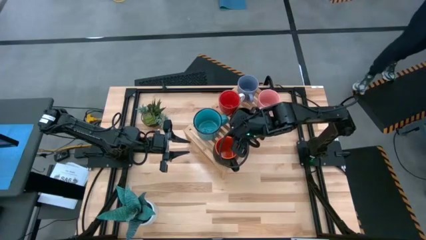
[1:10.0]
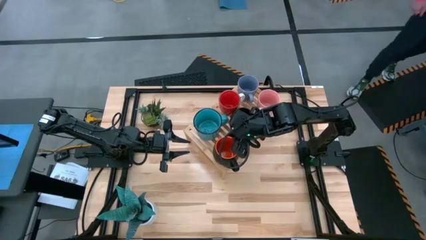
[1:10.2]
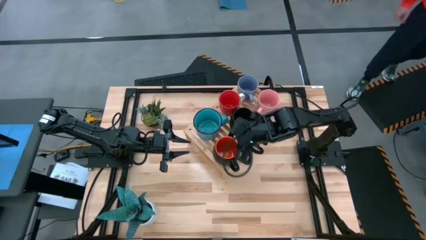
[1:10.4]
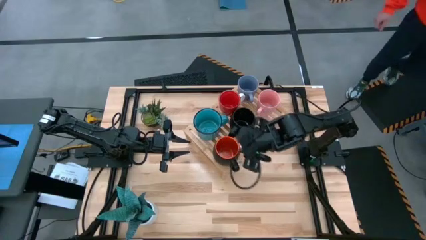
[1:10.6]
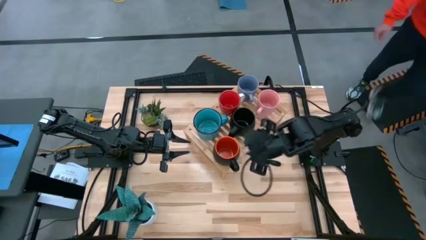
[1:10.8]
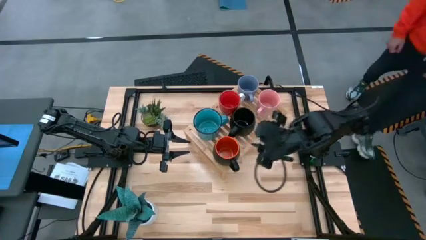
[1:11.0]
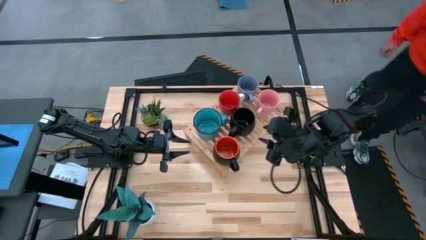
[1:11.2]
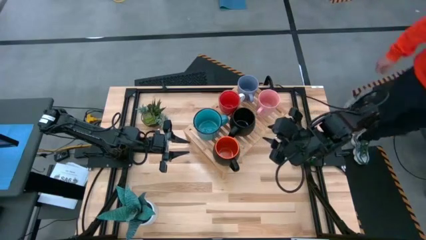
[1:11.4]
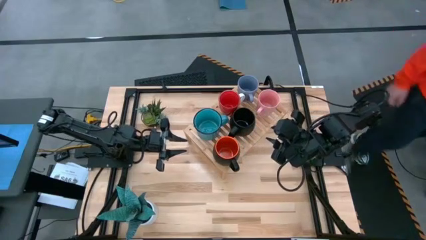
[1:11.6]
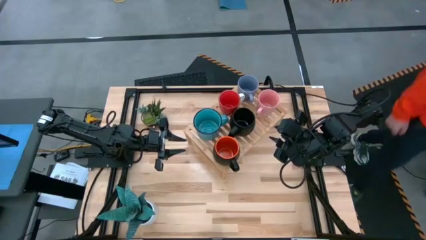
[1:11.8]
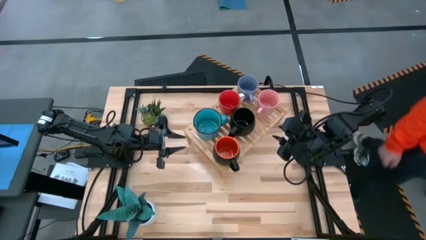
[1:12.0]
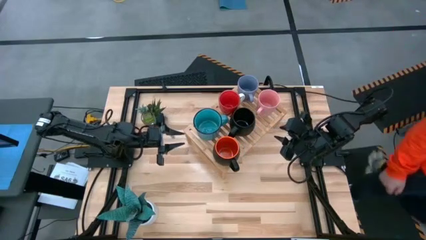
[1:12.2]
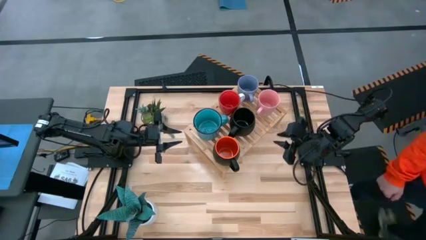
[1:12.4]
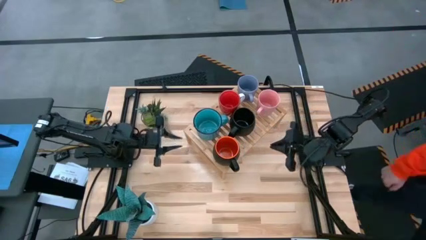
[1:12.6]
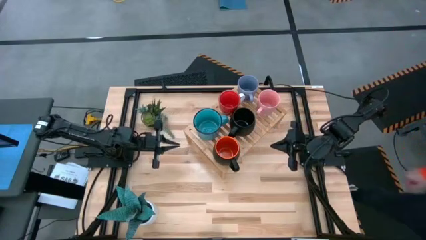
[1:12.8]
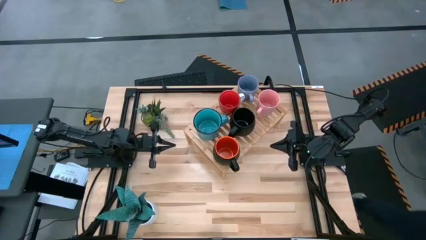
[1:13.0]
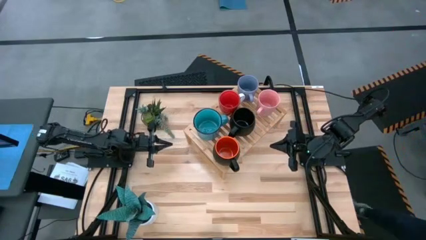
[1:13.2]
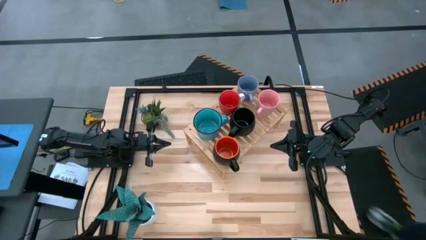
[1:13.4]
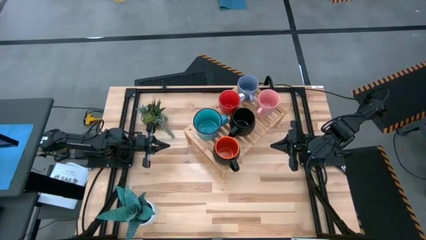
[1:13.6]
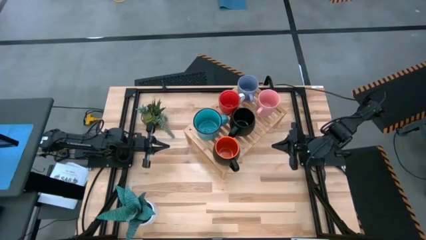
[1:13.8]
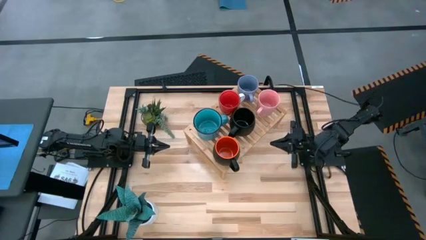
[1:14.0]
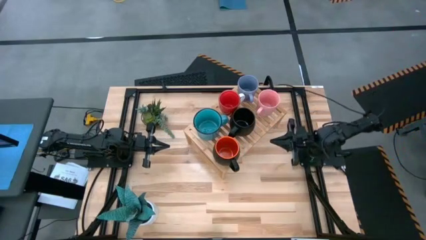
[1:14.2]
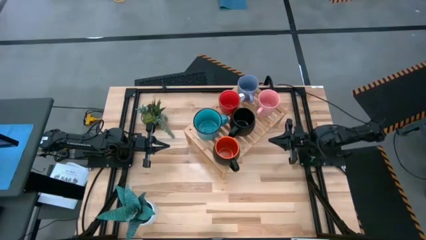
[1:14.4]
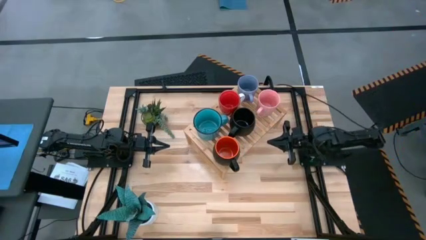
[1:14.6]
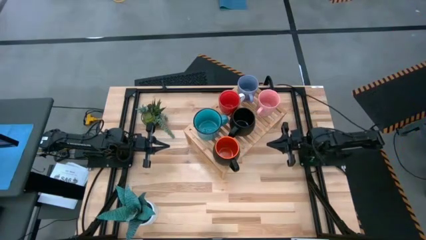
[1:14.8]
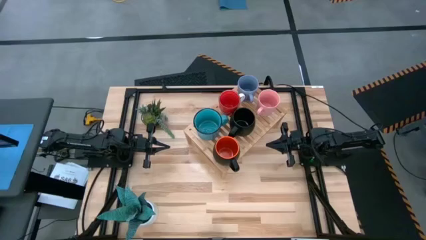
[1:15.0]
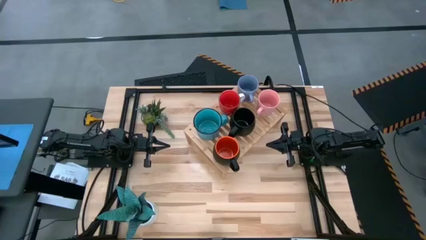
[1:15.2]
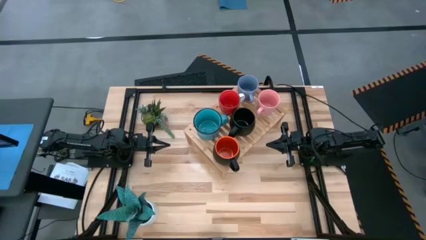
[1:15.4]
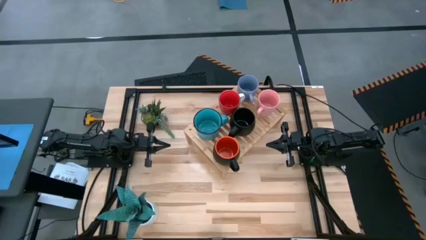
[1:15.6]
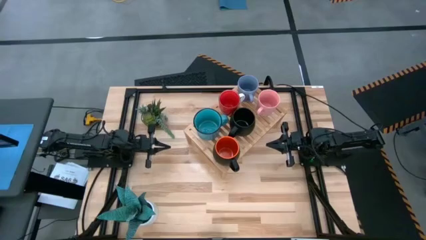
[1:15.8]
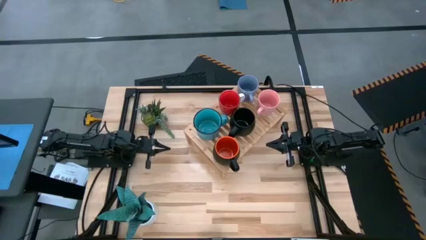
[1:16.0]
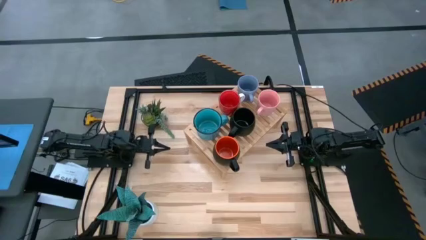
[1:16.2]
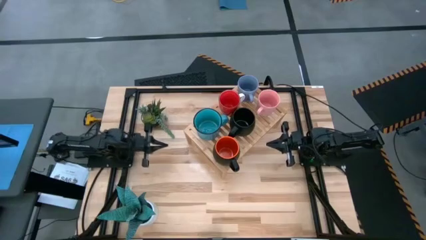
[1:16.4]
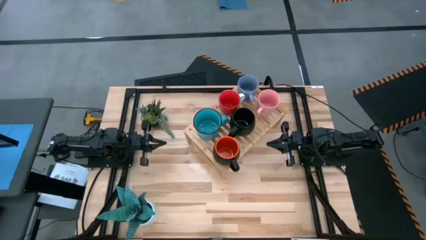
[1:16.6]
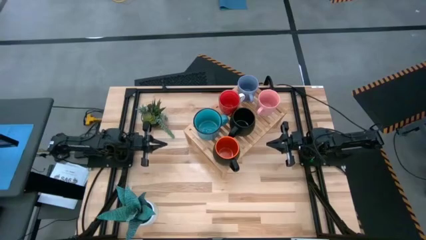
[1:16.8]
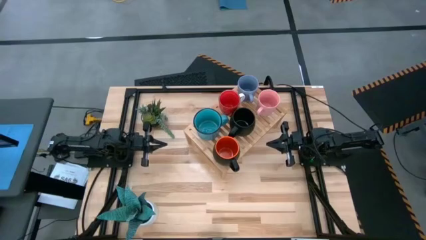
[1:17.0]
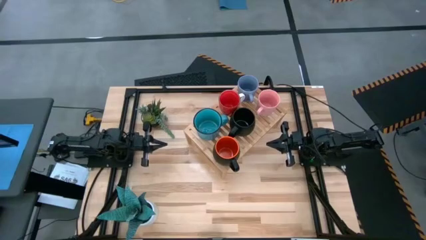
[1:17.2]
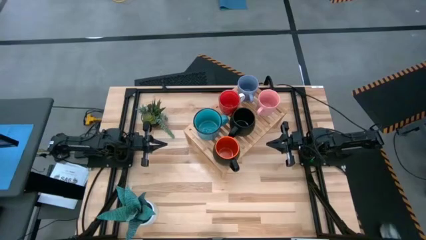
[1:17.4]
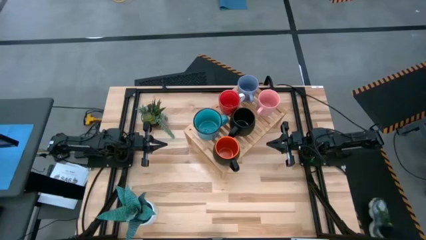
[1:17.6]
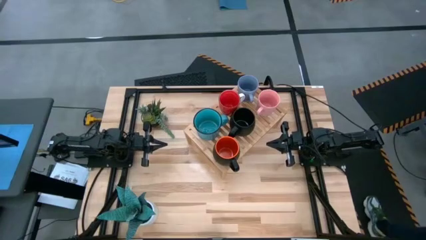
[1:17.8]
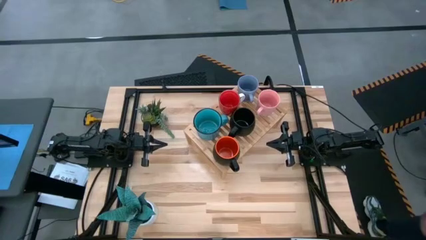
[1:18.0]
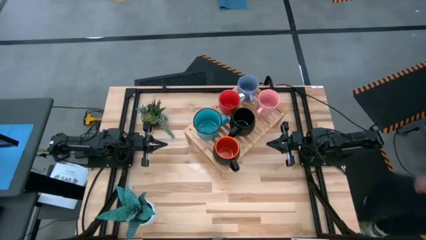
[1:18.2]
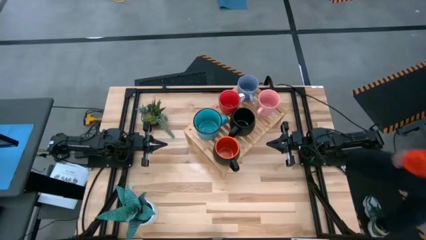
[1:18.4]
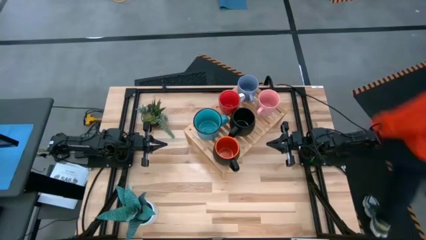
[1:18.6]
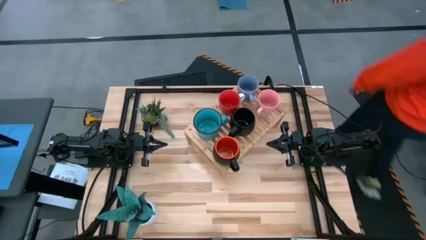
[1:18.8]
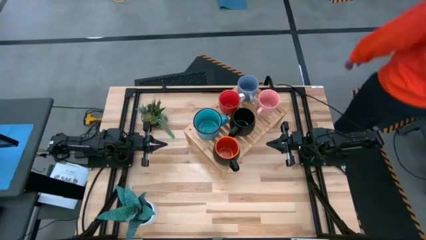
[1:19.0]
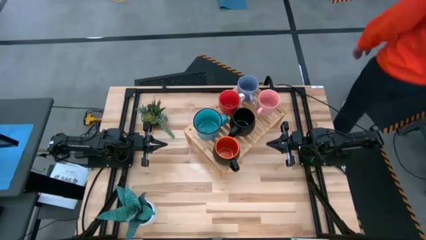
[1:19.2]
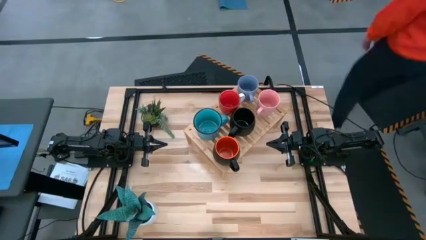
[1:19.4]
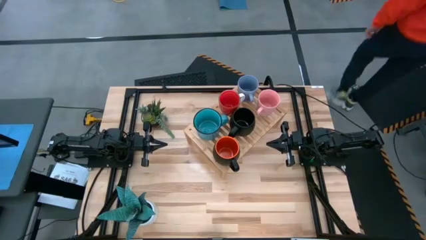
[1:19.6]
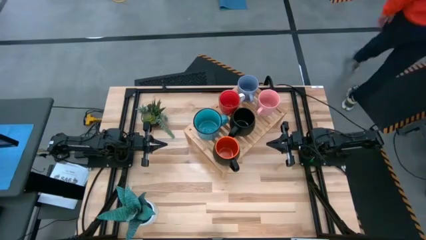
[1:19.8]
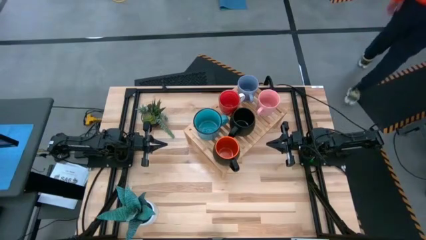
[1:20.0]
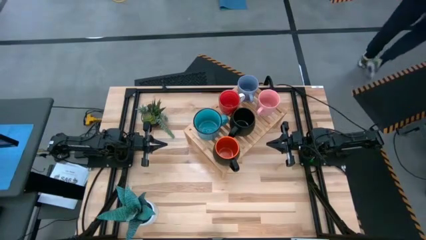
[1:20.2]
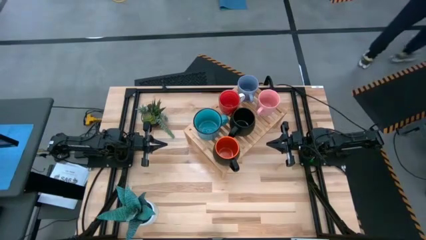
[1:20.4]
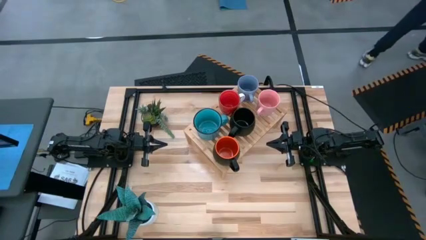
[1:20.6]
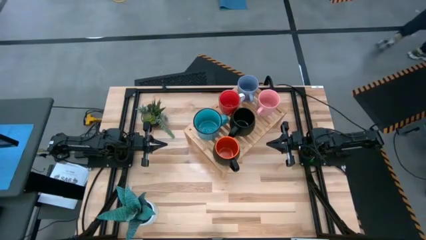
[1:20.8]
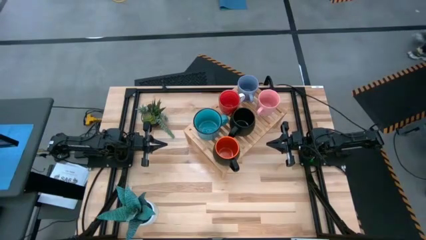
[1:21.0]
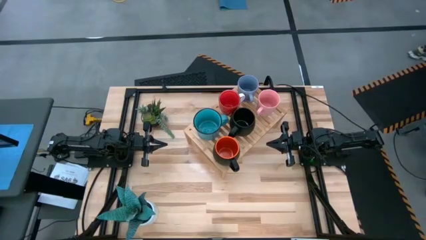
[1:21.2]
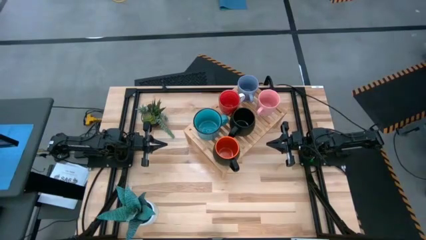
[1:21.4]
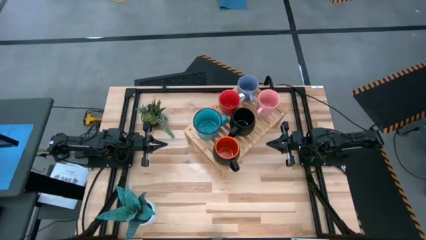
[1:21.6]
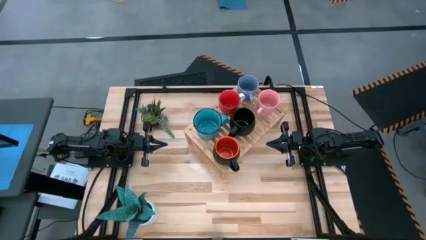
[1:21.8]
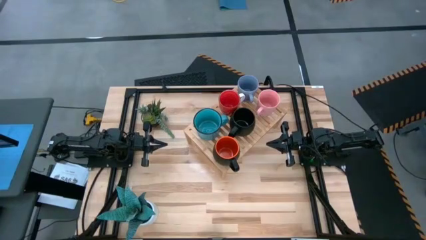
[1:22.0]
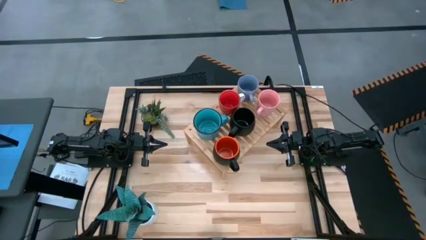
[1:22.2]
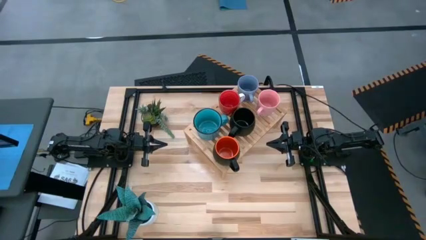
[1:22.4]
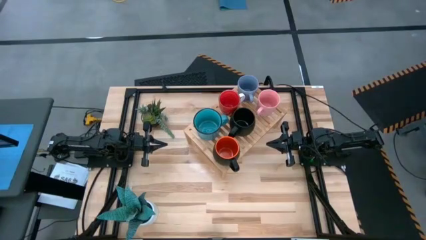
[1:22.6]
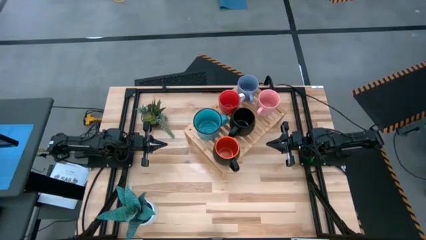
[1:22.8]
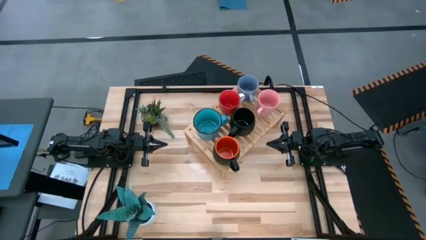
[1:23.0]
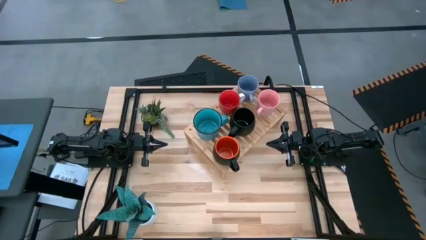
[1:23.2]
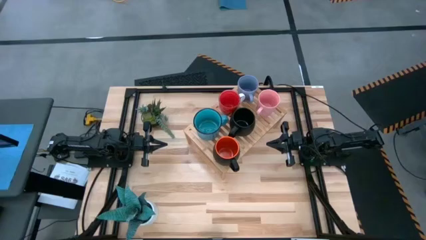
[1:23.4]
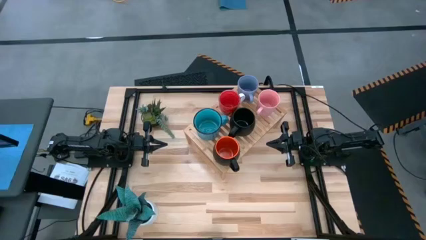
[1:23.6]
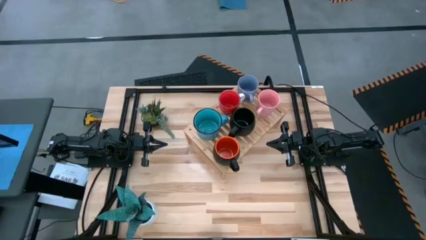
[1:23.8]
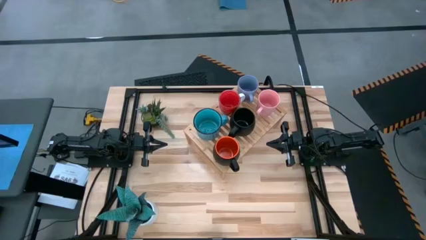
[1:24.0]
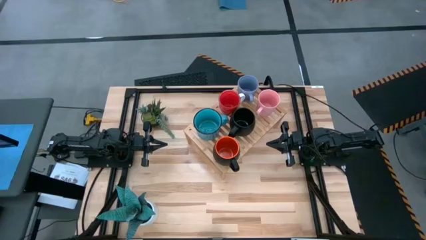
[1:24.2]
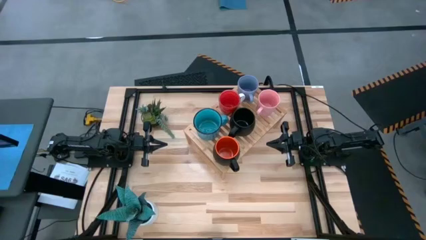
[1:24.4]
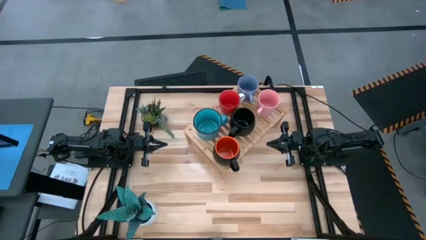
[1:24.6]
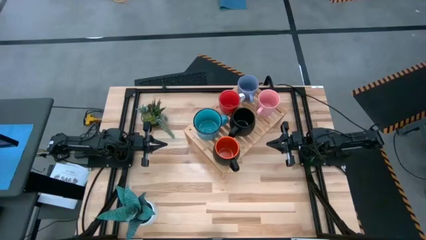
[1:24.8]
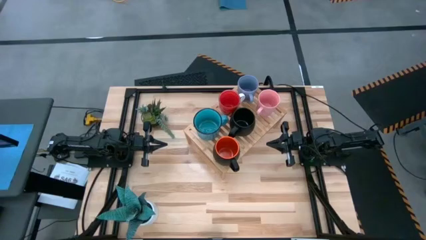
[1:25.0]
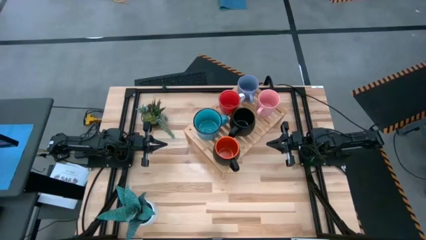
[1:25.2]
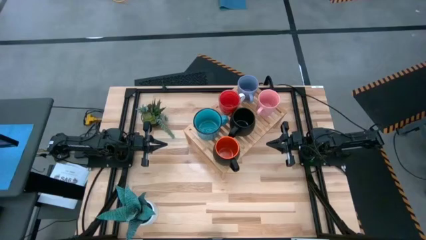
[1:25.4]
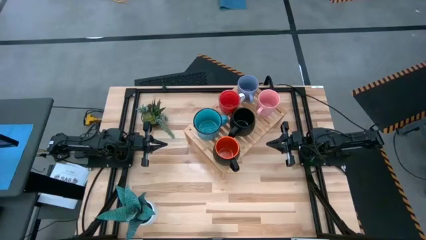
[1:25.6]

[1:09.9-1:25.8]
Task: Place coffee mugs
Return to Home Position
